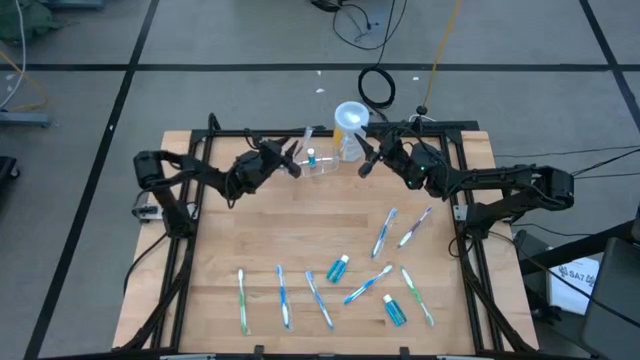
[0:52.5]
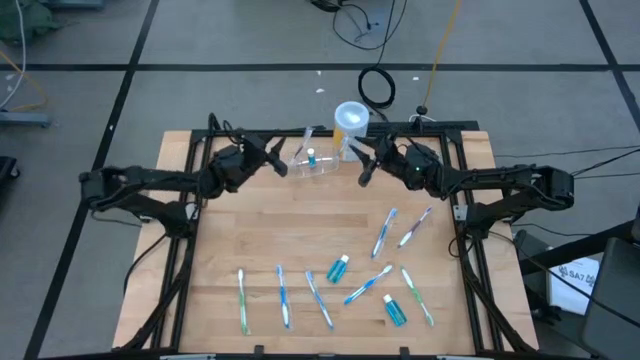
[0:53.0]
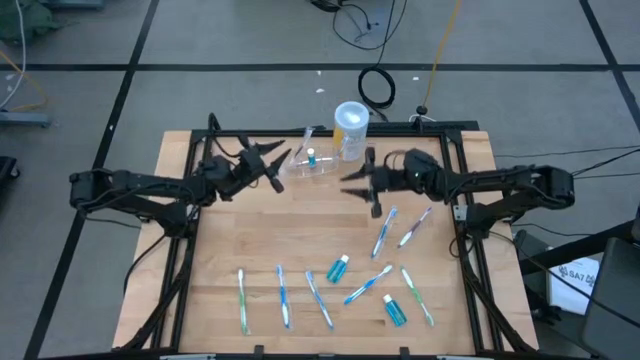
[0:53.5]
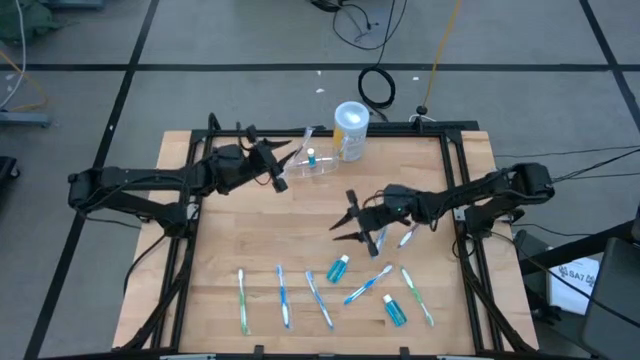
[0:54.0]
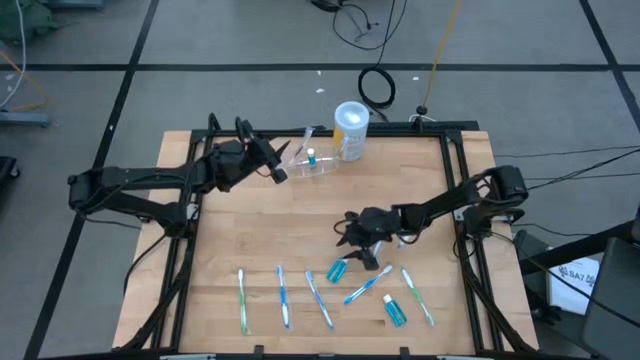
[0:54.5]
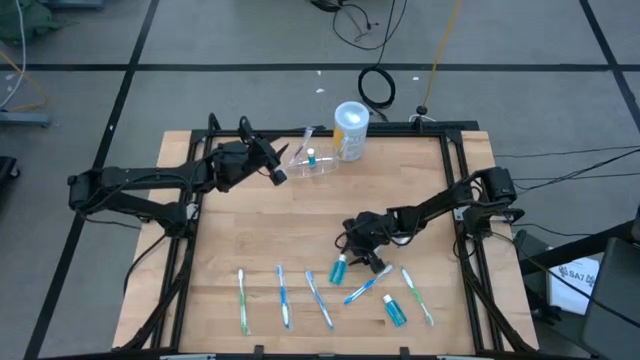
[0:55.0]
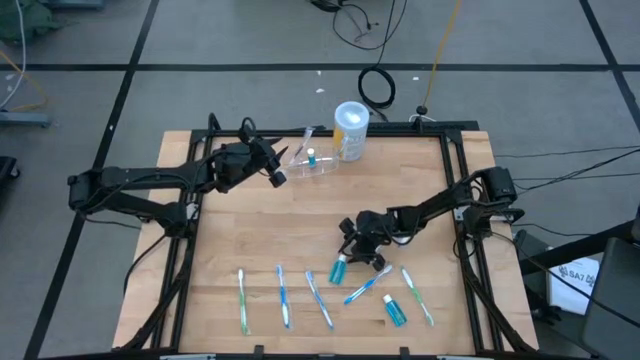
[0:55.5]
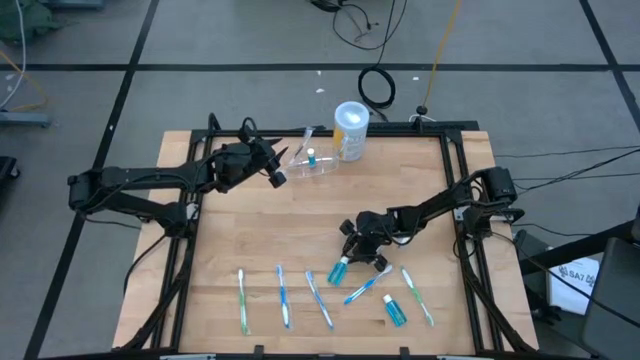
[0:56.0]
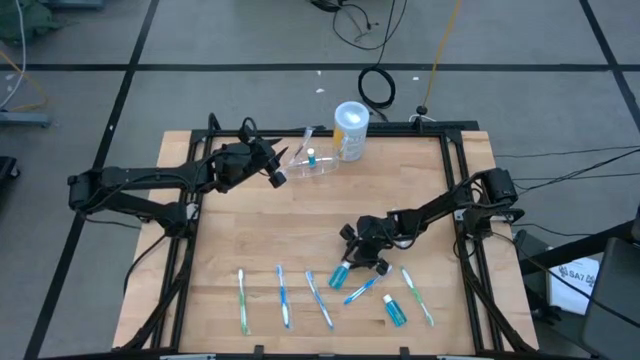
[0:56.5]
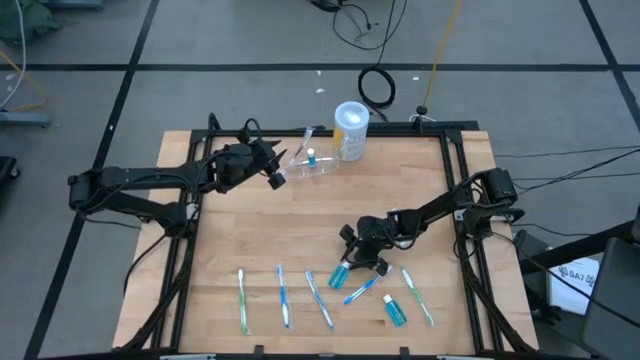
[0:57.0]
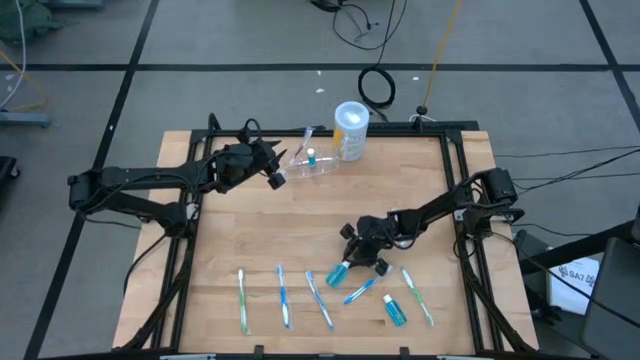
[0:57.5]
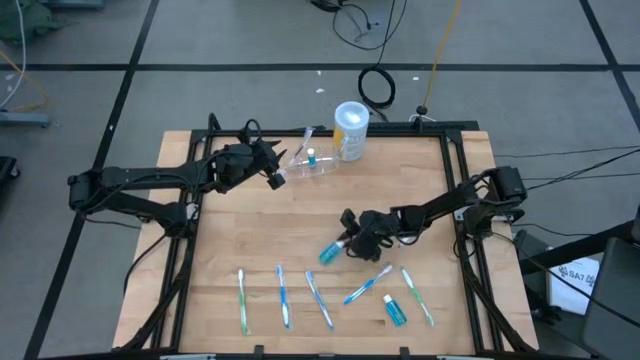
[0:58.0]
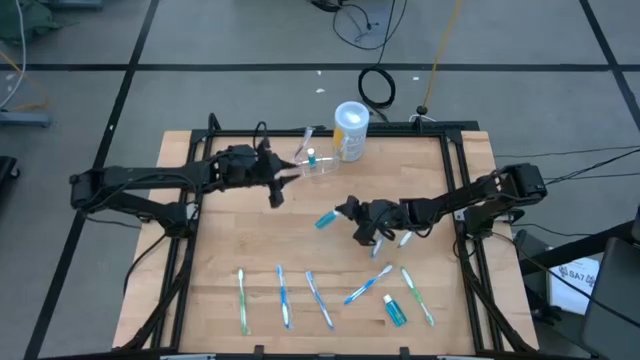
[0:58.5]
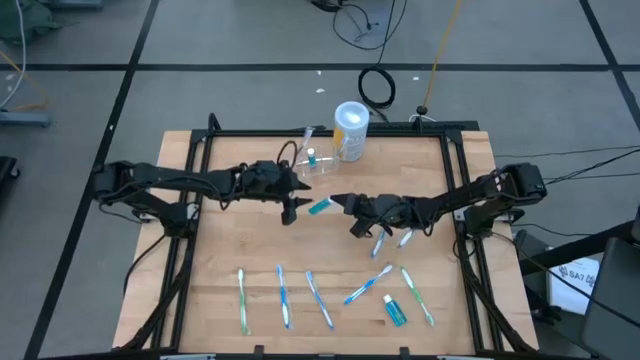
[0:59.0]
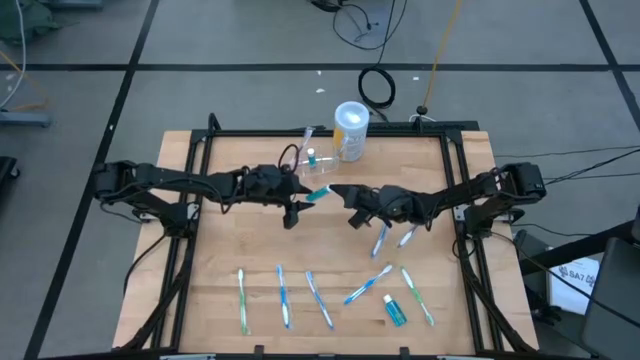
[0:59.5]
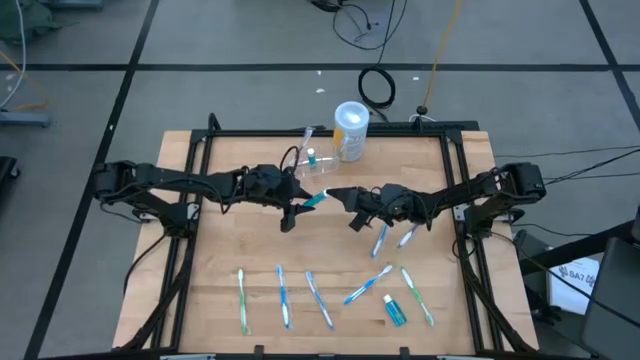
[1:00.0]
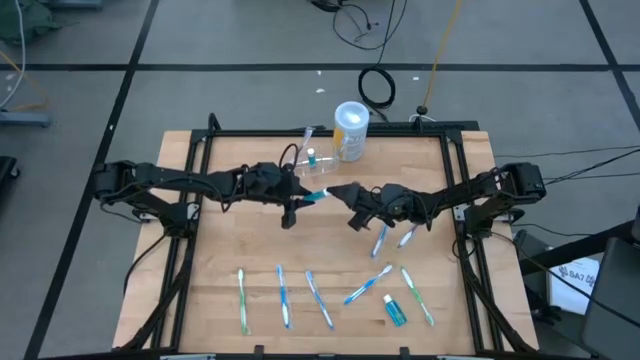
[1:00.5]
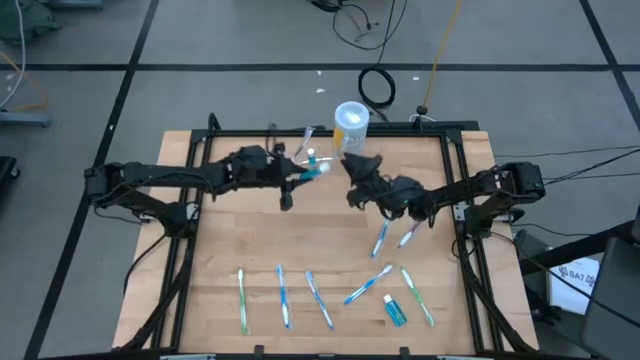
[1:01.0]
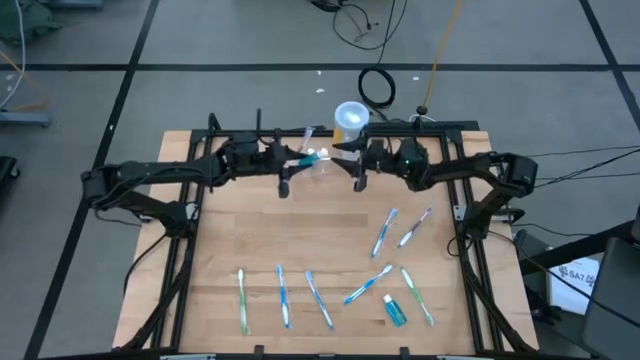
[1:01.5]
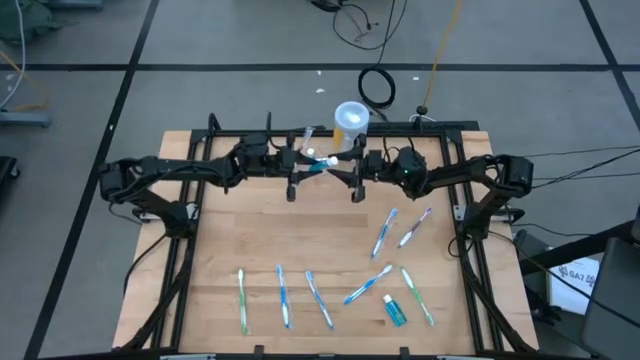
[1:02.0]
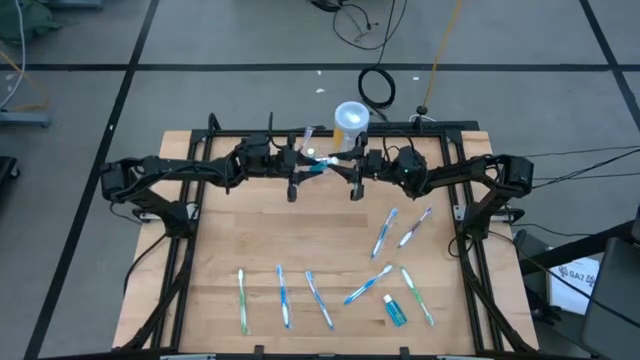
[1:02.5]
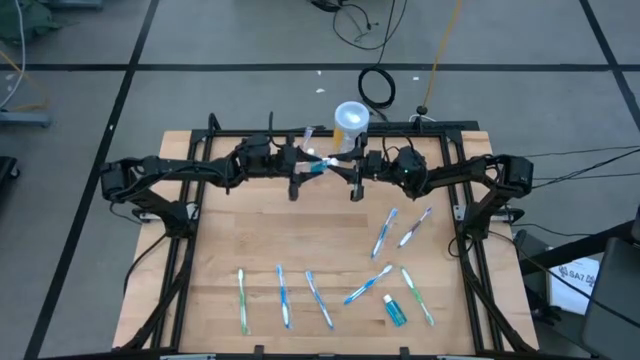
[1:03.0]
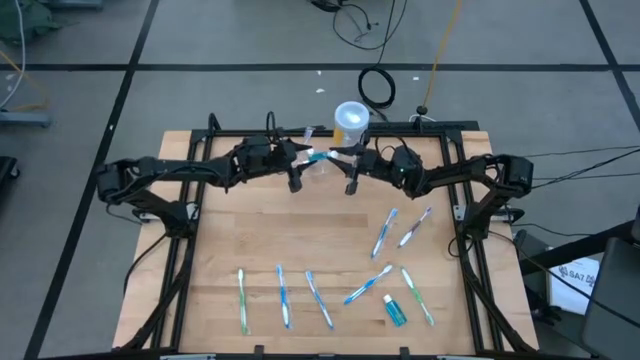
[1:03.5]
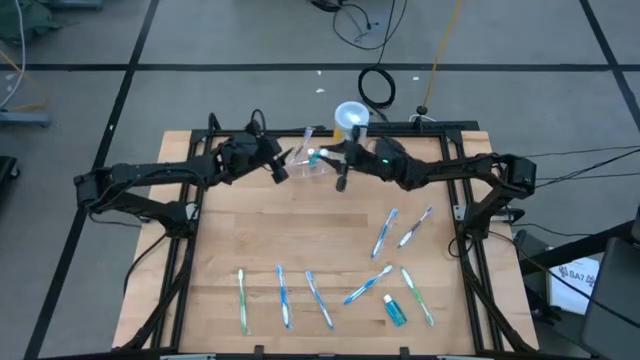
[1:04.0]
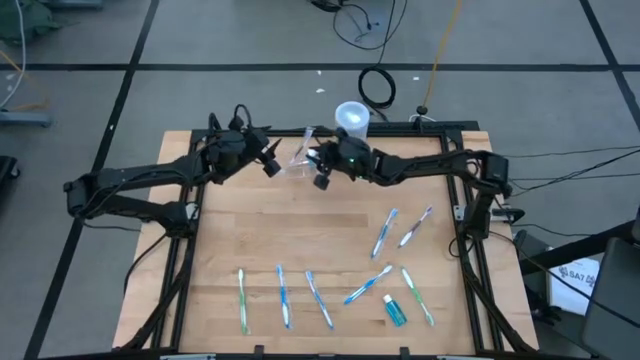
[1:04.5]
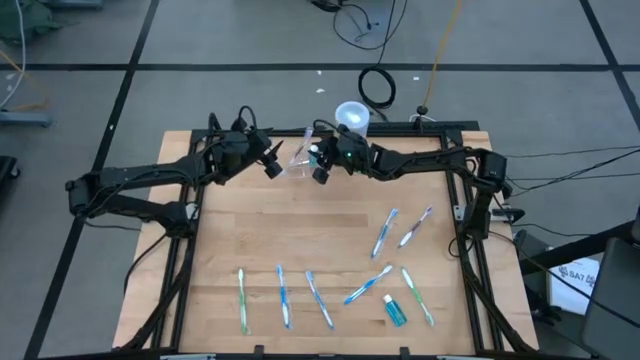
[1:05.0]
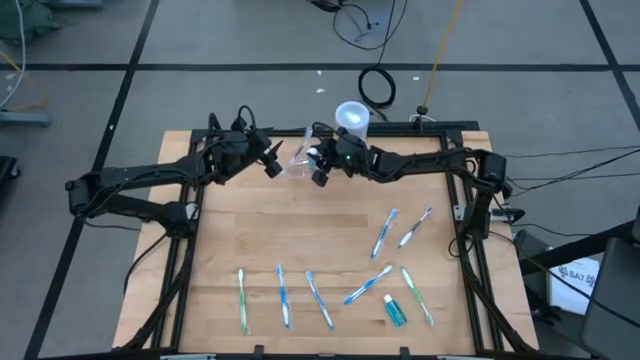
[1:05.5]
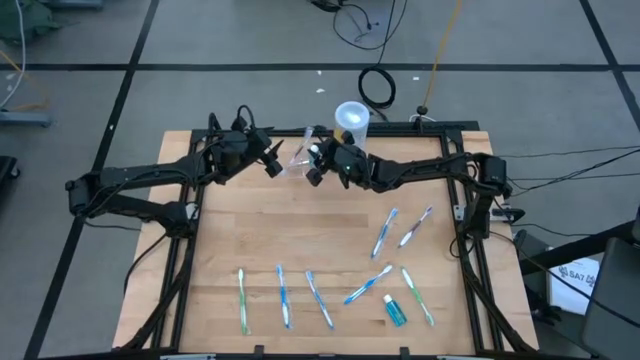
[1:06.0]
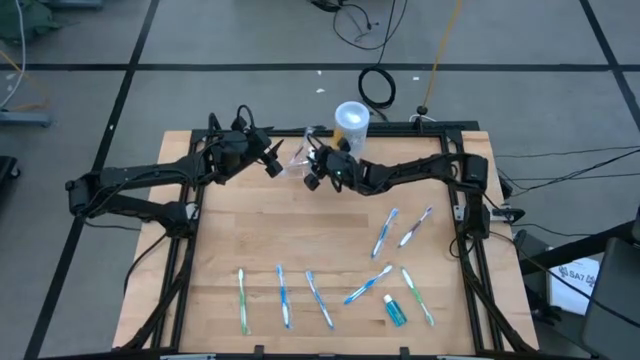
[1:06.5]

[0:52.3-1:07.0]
Task: Pick & Place toothbrushing station
Put the top blue mouthwash into the middle section of the transparent organizer

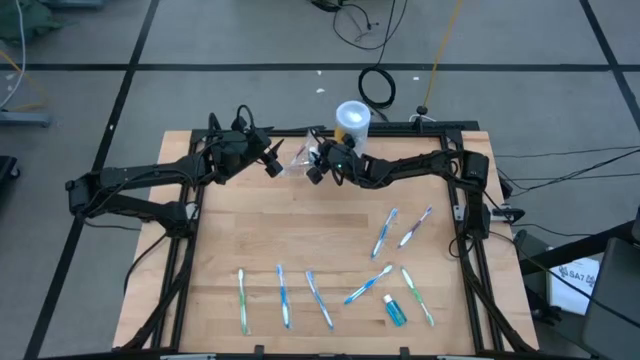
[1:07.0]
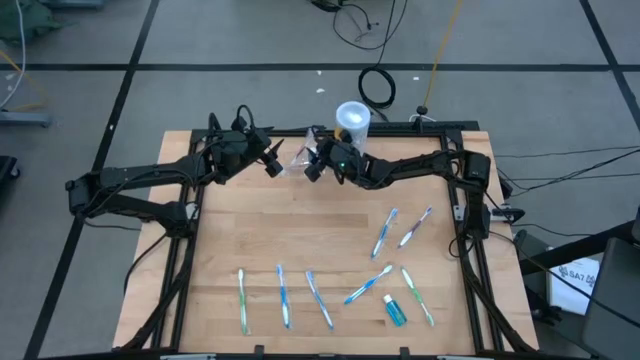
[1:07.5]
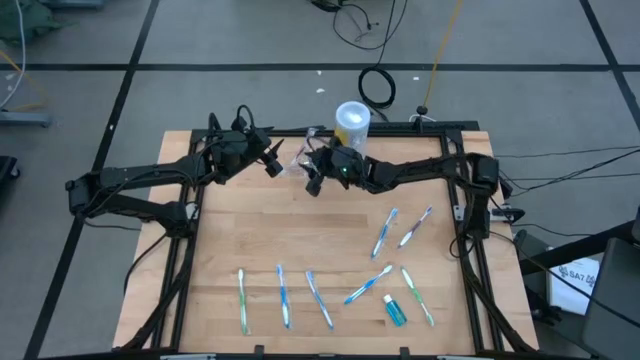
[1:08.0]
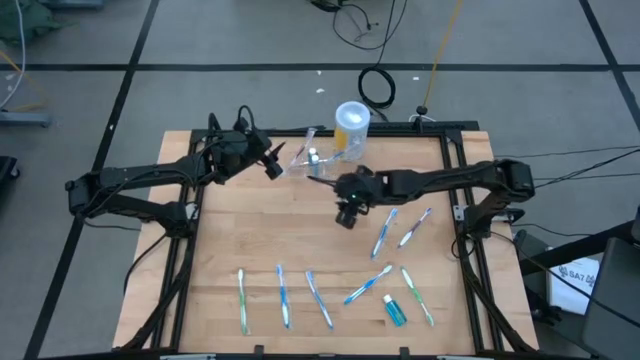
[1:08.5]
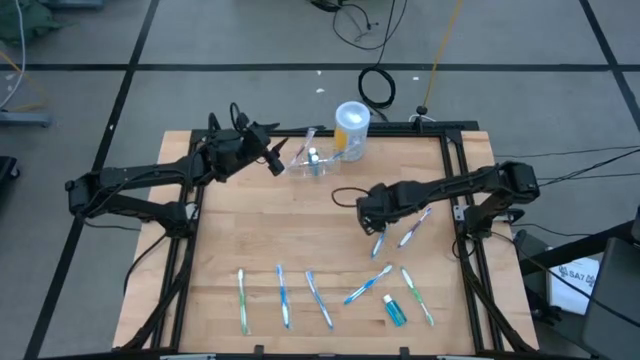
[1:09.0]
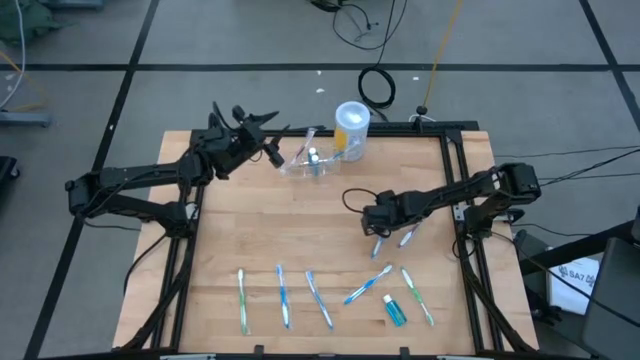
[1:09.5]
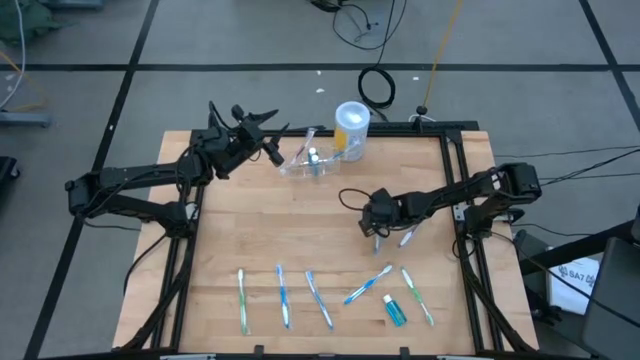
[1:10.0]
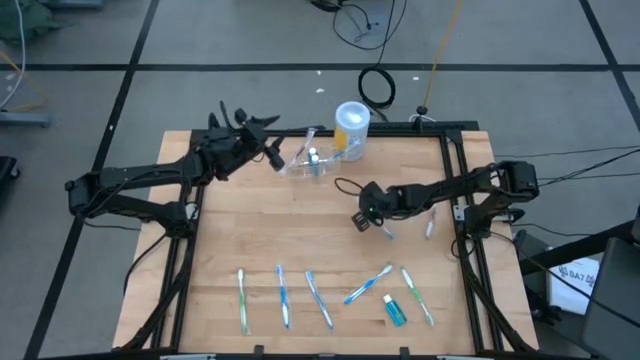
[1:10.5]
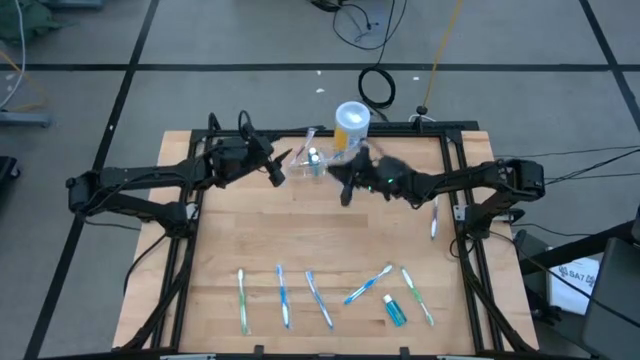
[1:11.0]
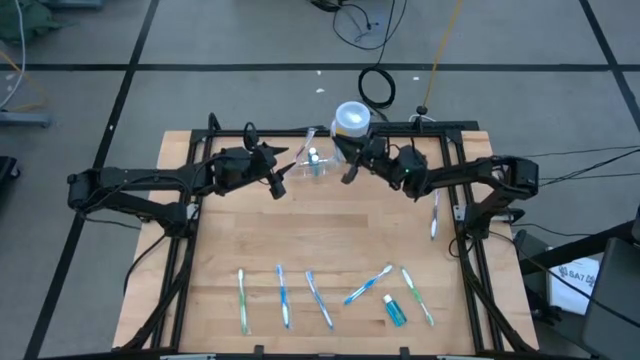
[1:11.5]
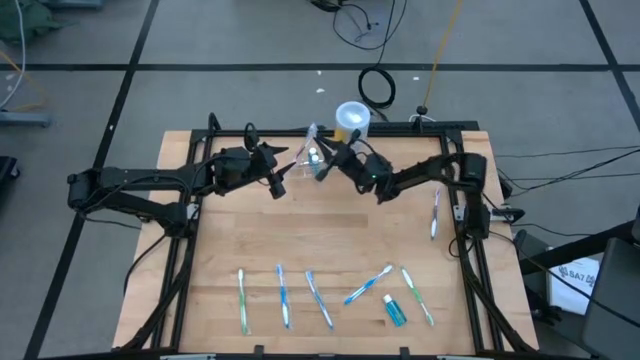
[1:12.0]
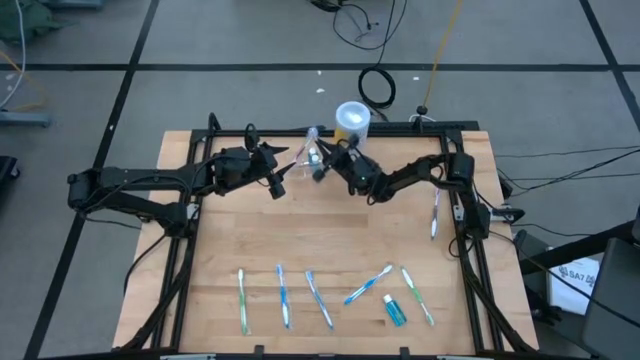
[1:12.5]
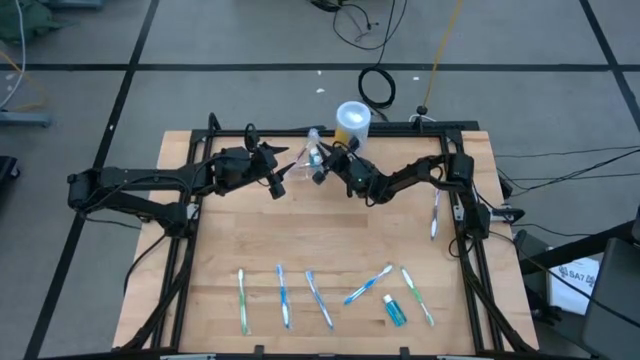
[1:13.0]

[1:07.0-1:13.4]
Put the blue toothbrush into the right section of the transparent organizer

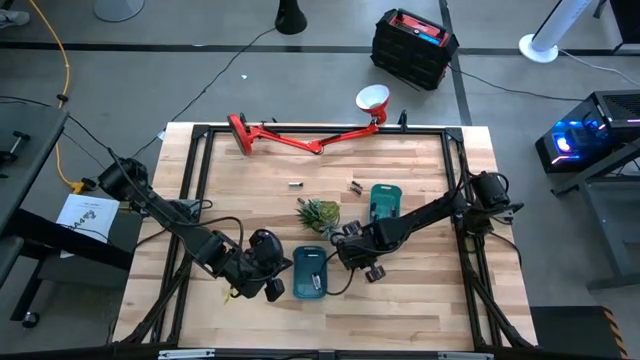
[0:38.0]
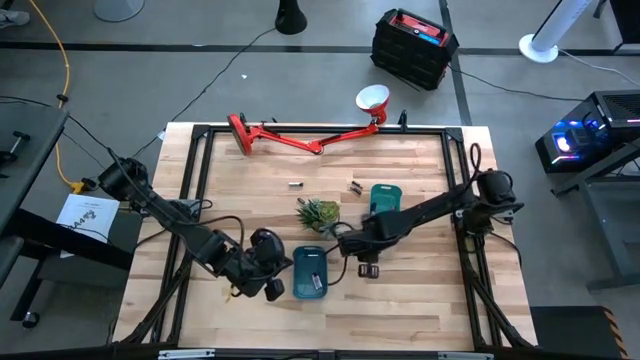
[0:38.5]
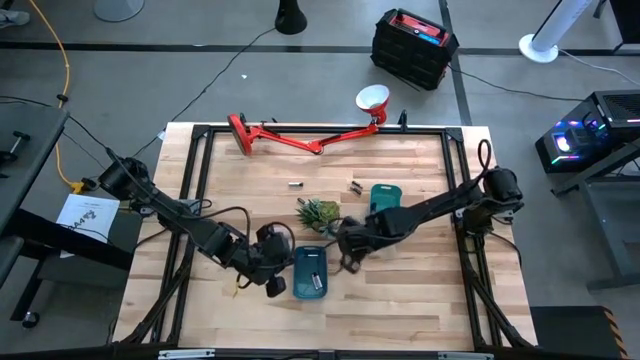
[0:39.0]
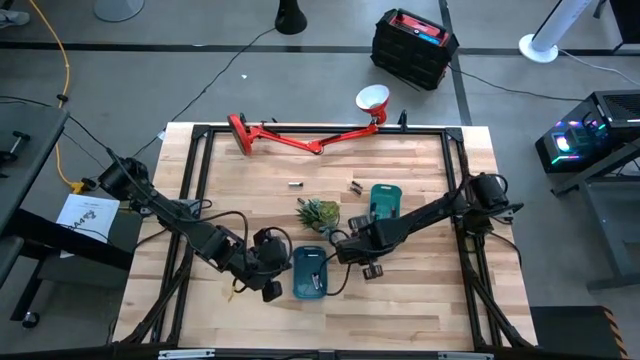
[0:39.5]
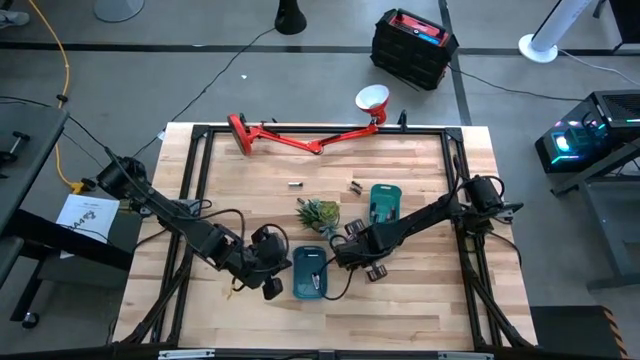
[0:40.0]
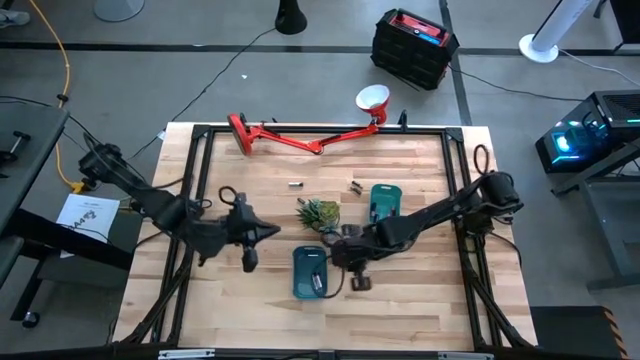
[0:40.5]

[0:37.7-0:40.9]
Task: Sort batteries
Put the silver battery into the blue bin
